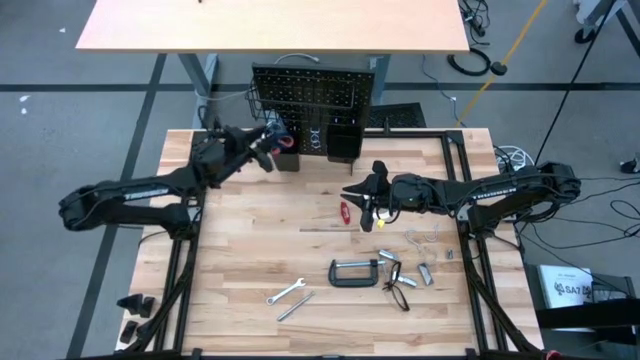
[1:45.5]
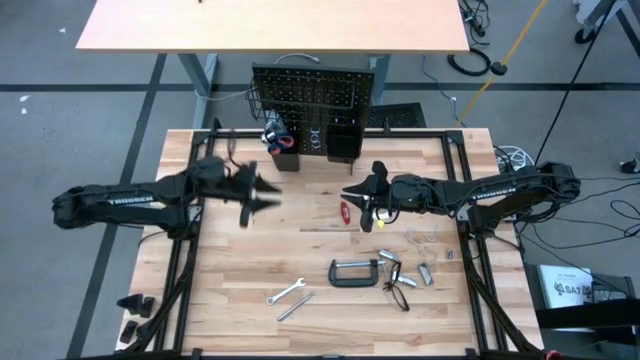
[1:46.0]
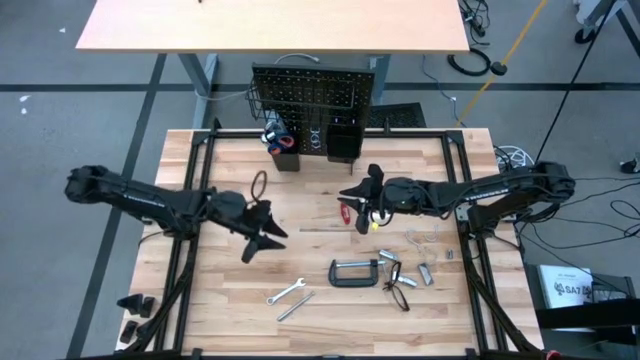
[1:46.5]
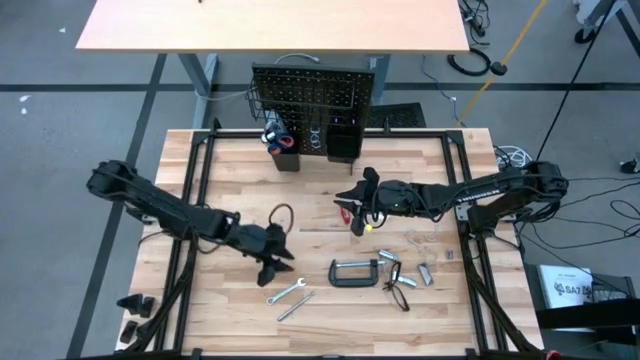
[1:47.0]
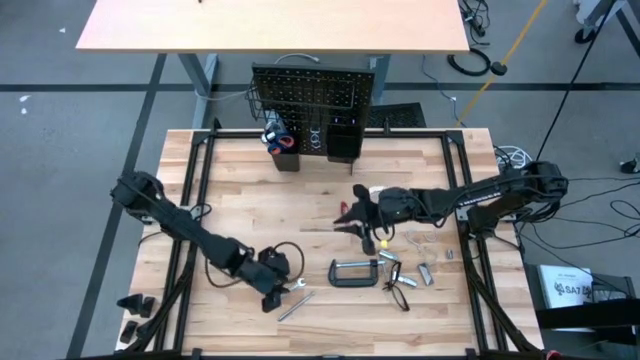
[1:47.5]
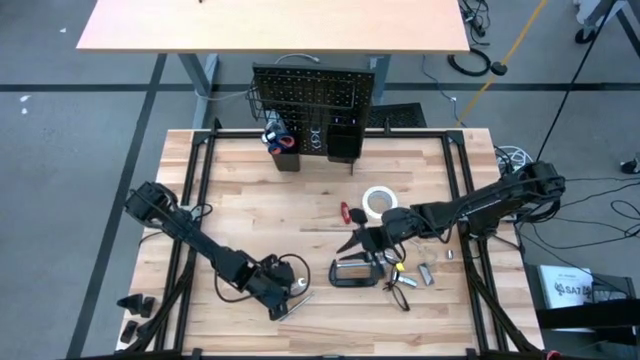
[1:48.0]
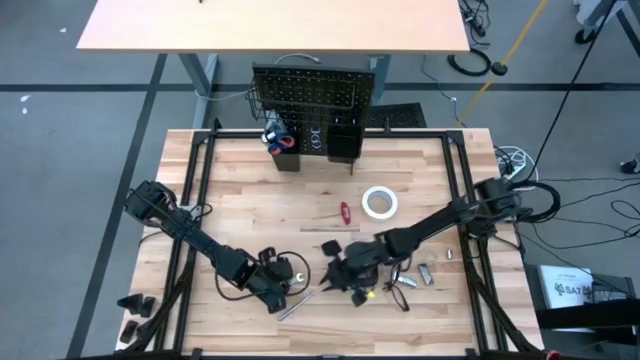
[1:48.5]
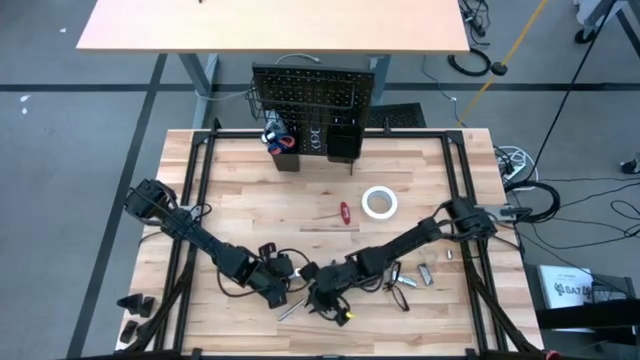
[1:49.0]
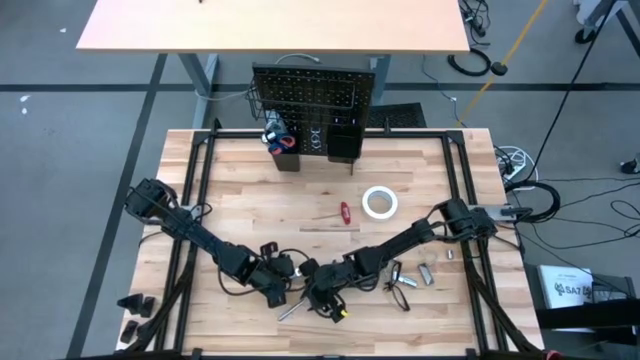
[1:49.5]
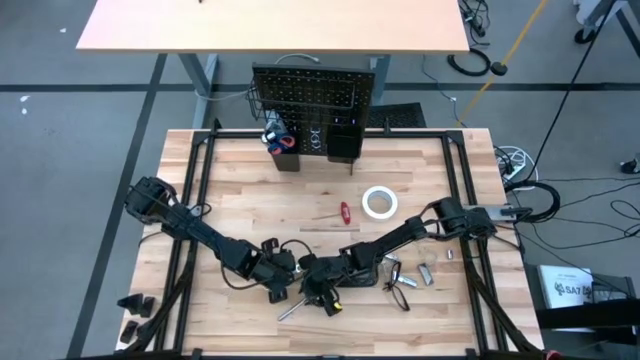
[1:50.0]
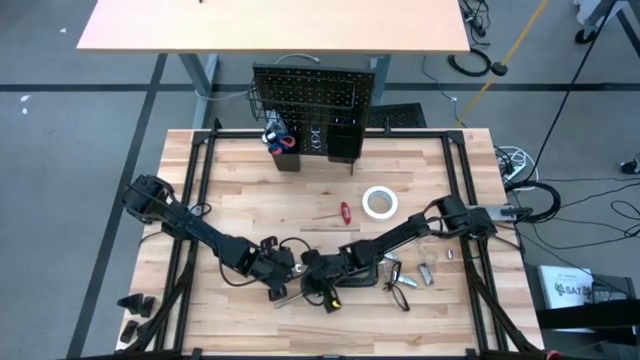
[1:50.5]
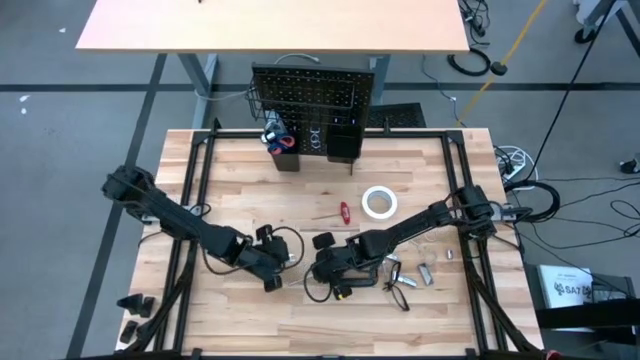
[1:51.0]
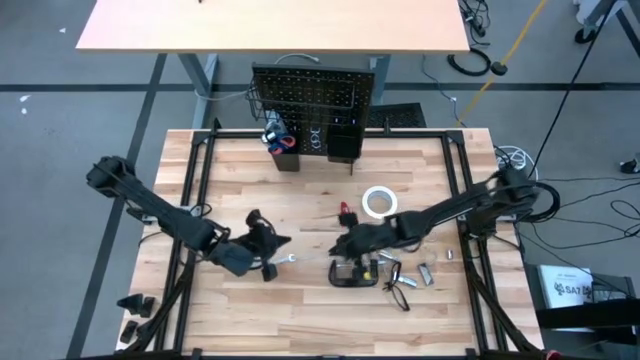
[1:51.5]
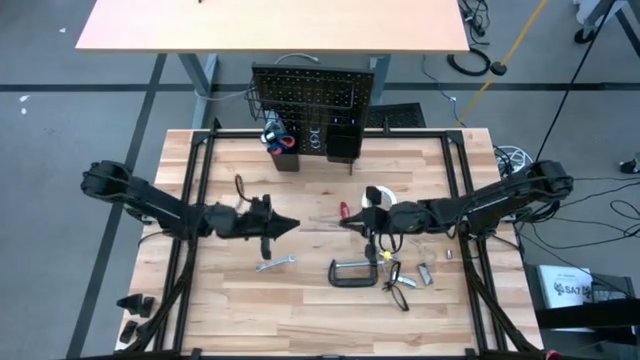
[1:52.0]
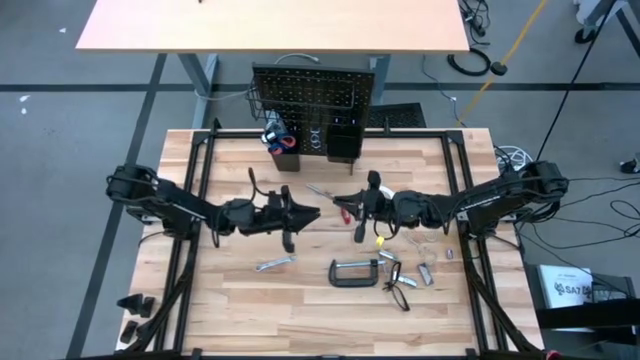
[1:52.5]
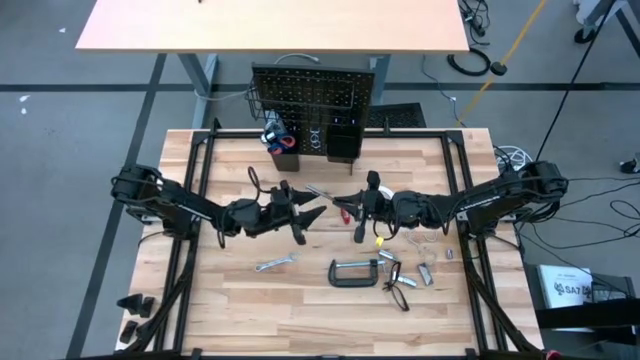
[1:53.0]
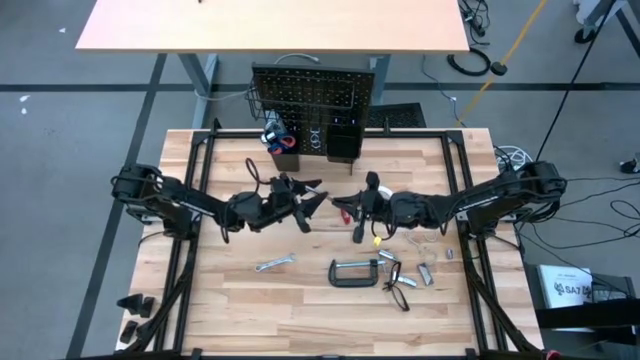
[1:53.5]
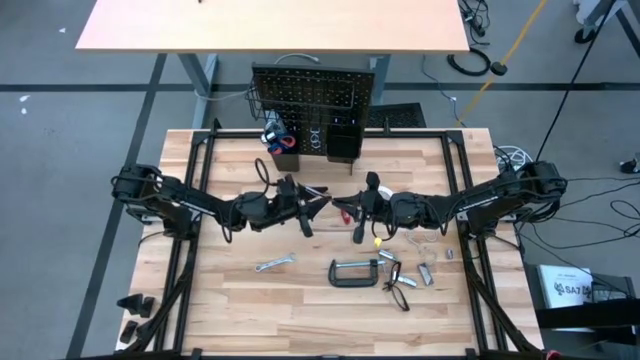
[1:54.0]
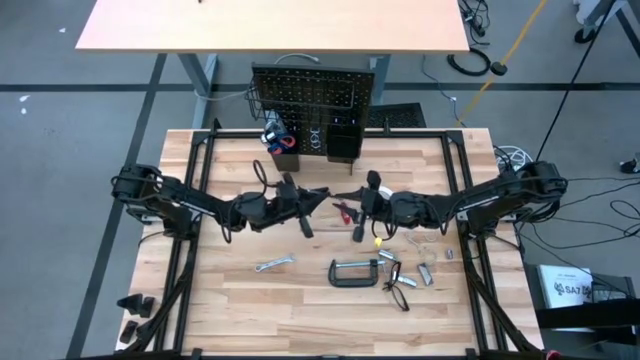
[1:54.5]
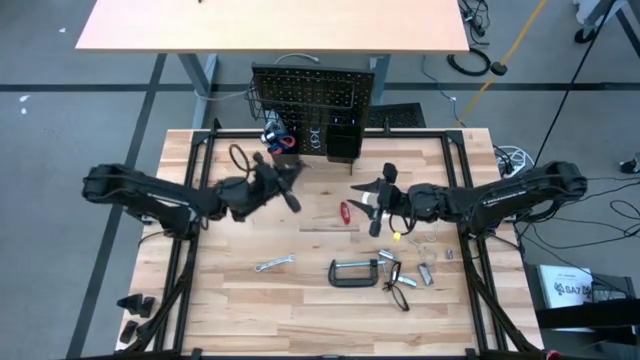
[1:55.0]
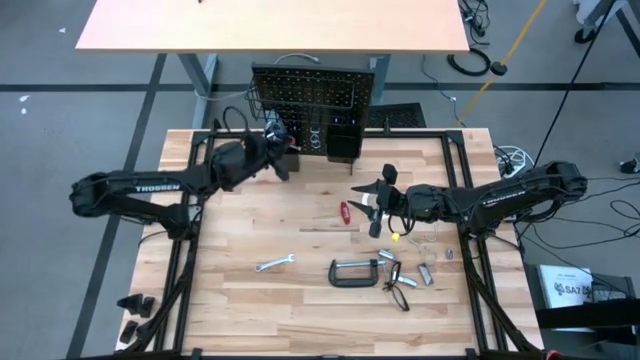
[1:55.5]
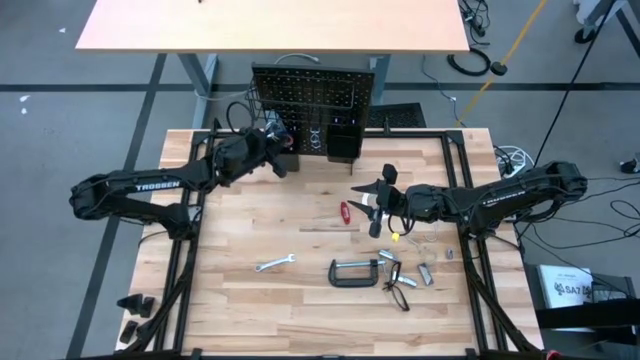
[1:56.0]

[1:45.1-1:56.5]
Task: Hang tools onto peg board
Put the pen on the left lower deck of the pegboard

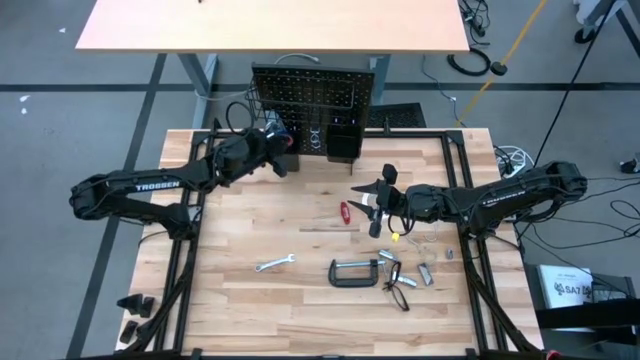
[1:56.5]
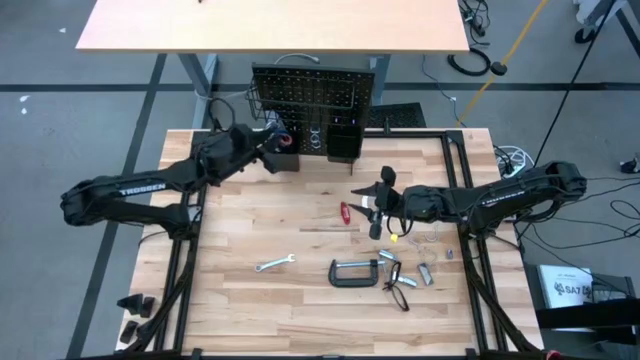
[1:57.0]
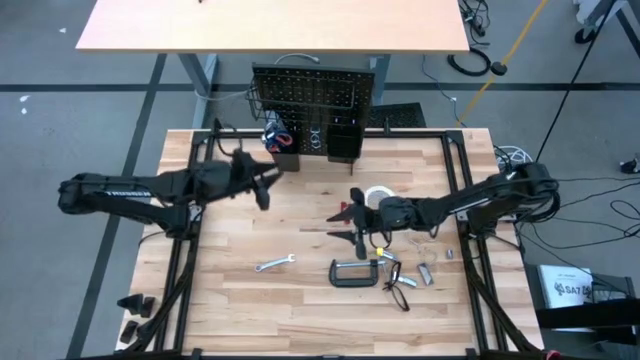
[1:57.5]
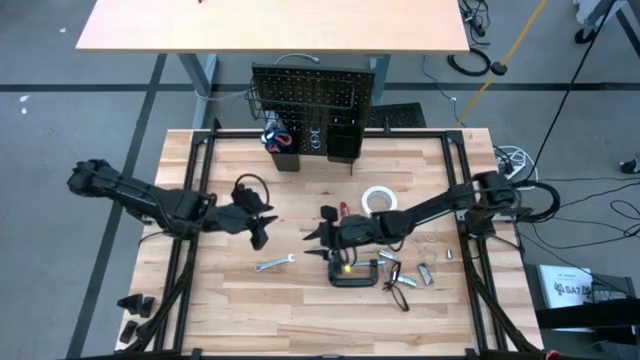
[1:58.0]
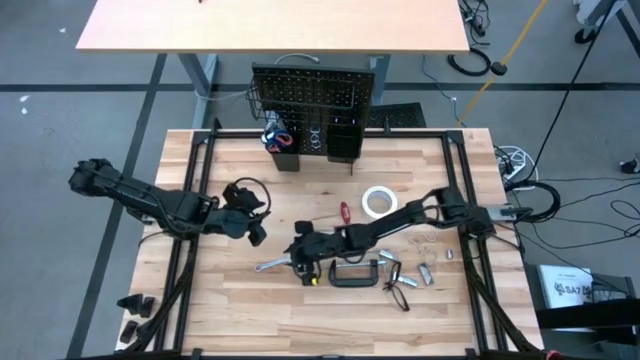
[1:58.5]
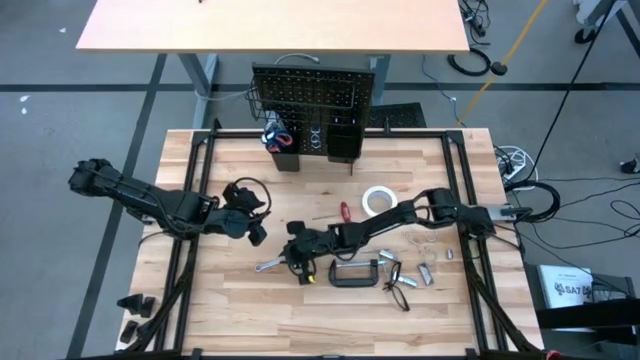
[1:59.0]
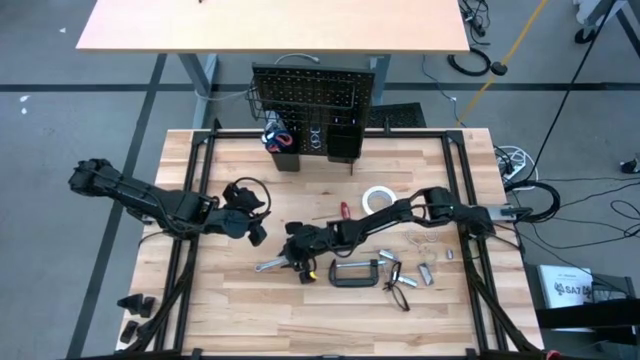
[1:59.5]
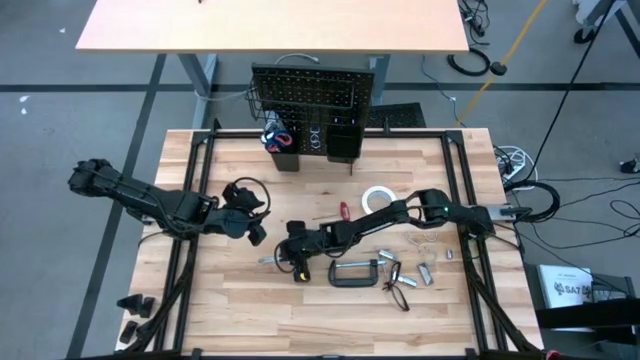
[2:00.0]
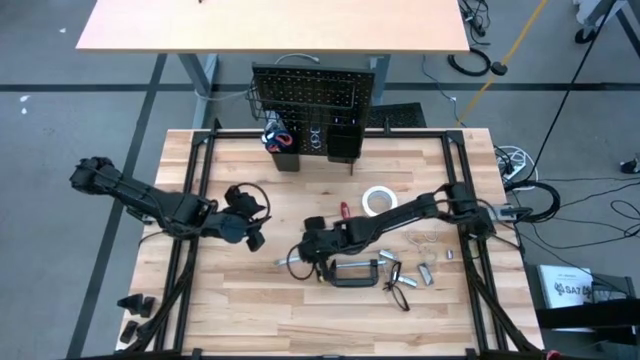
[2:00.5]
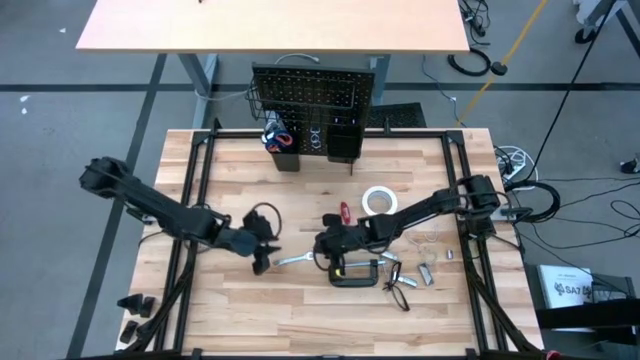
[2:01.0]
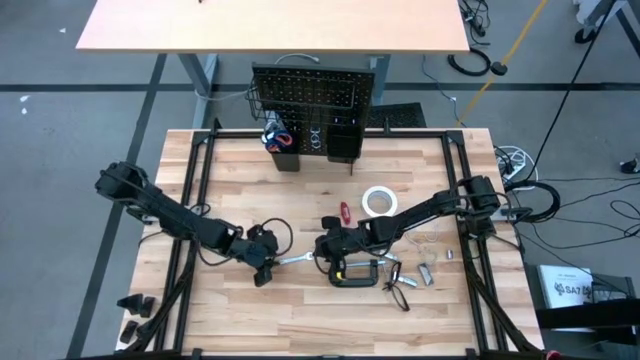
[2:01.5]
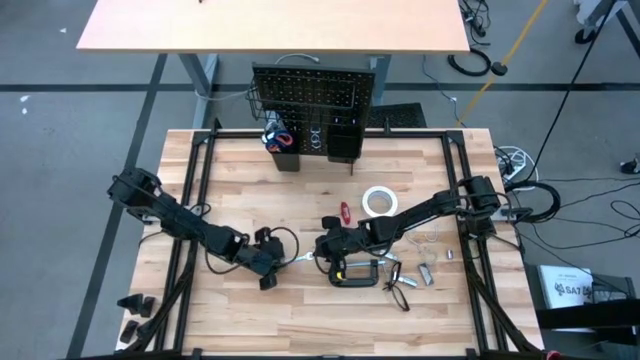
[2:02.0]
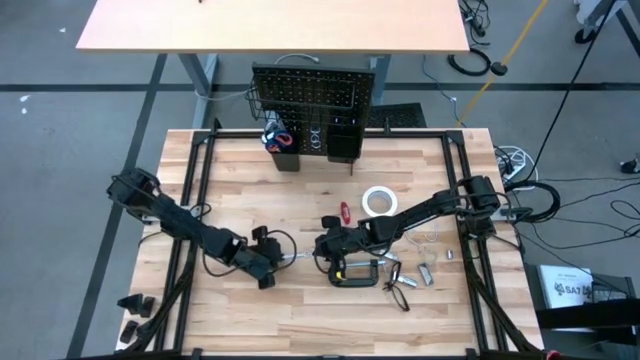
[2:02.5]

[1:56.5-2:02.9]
Put the combination wrench on the left lower deck of the pegboard
